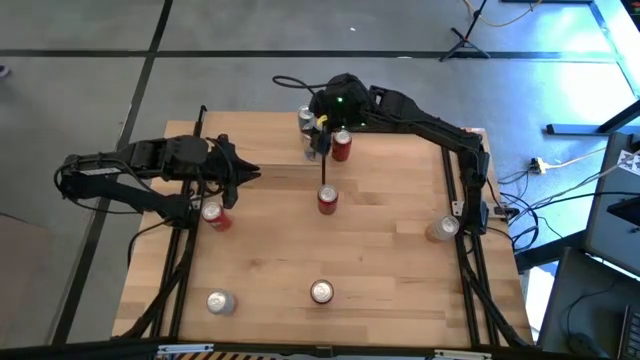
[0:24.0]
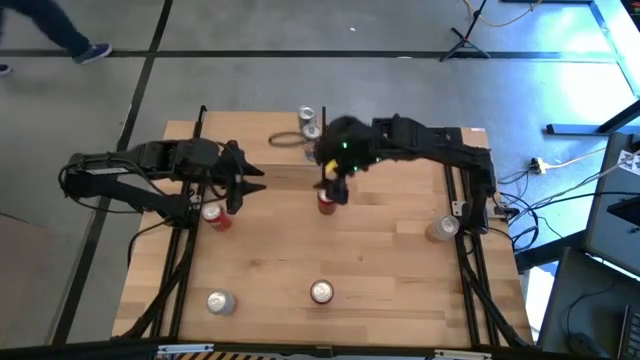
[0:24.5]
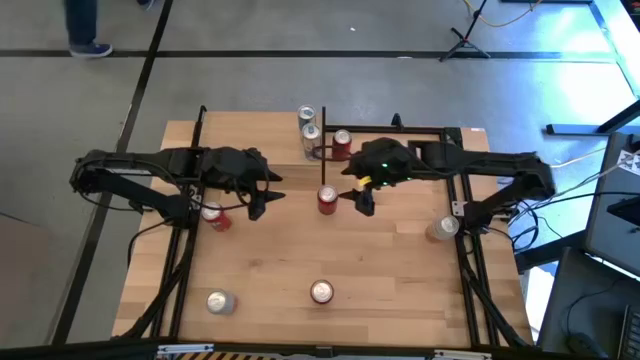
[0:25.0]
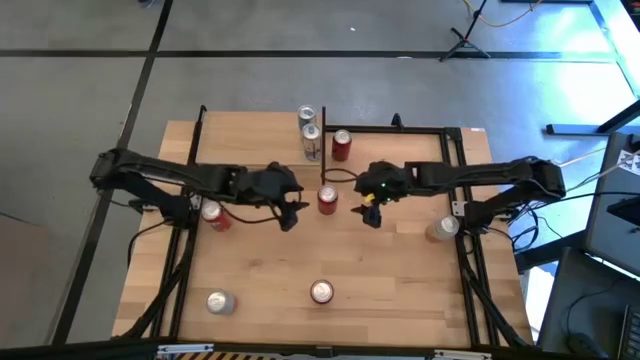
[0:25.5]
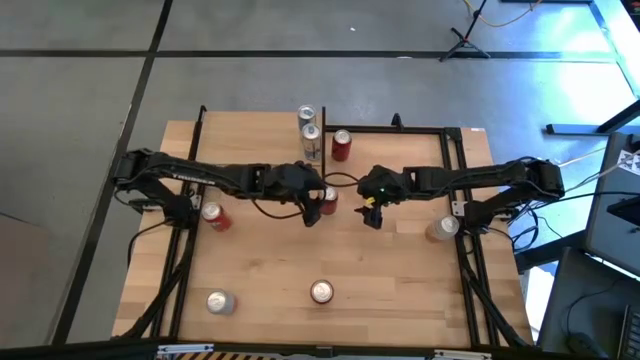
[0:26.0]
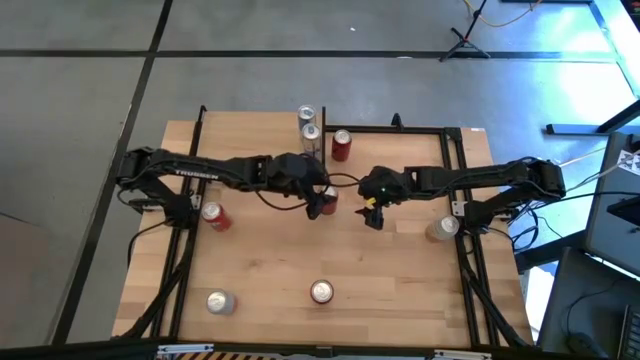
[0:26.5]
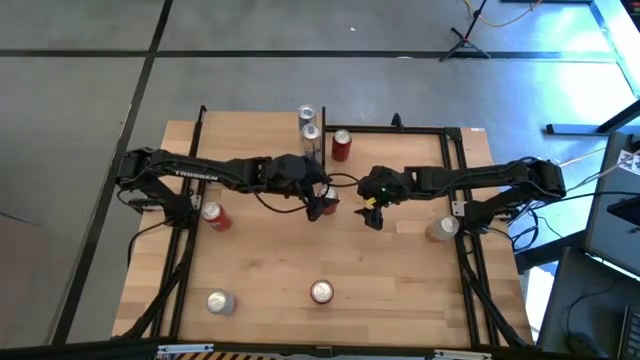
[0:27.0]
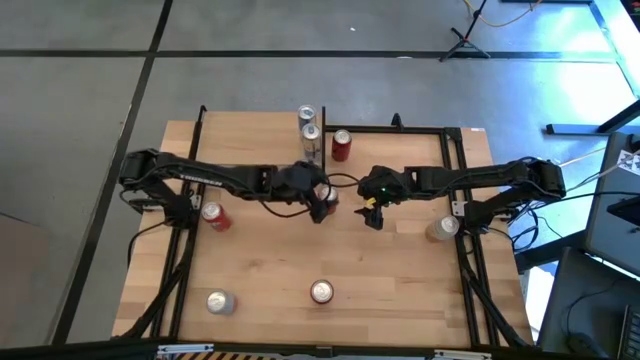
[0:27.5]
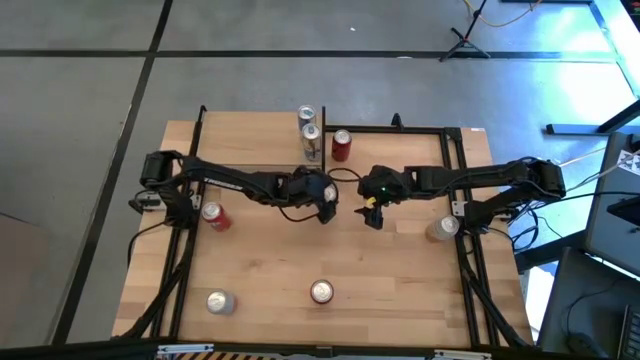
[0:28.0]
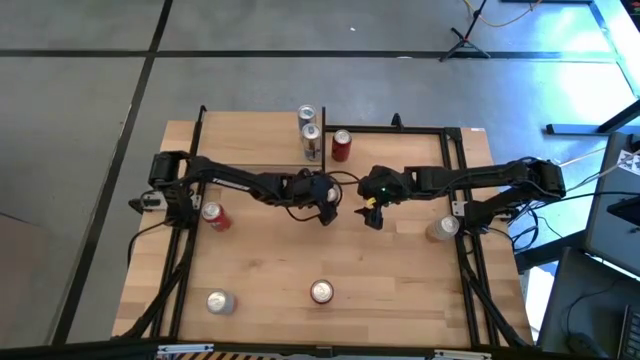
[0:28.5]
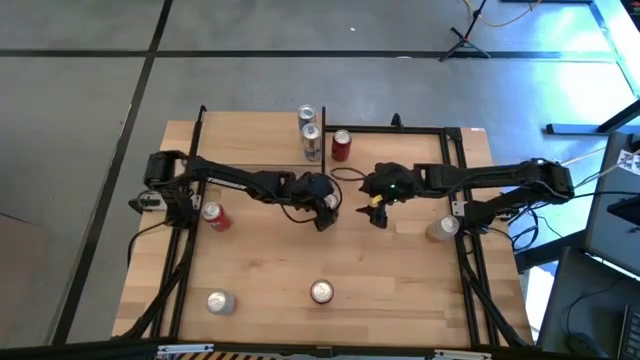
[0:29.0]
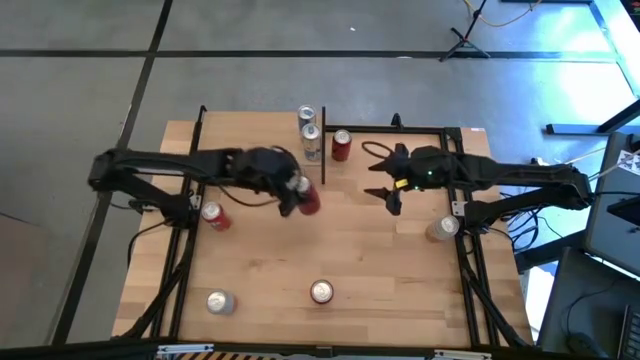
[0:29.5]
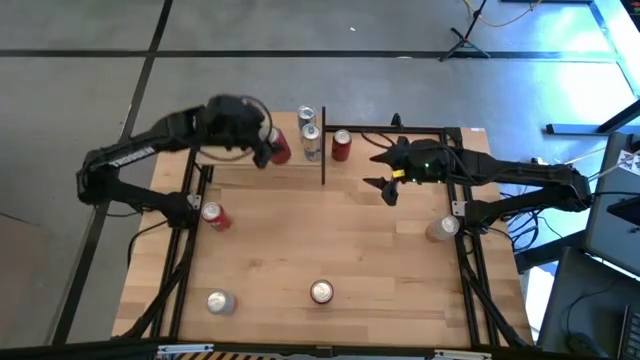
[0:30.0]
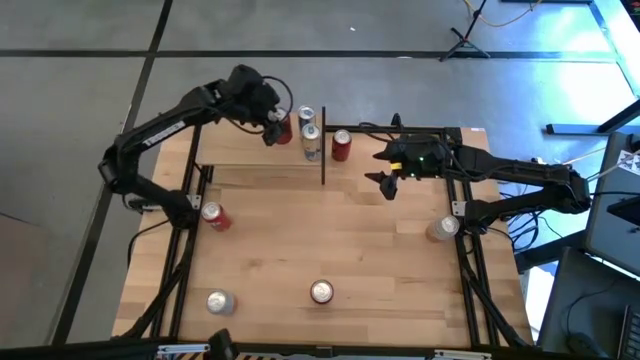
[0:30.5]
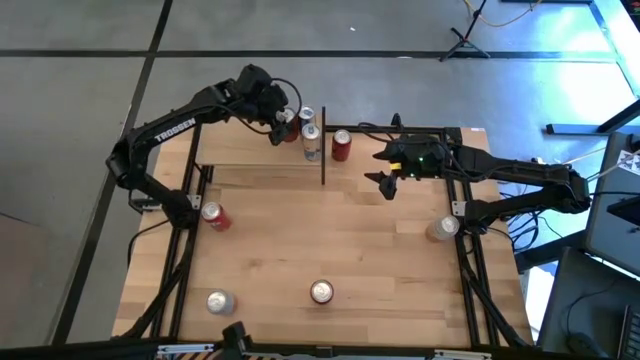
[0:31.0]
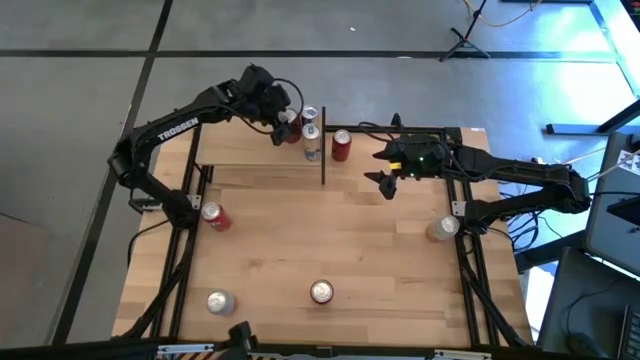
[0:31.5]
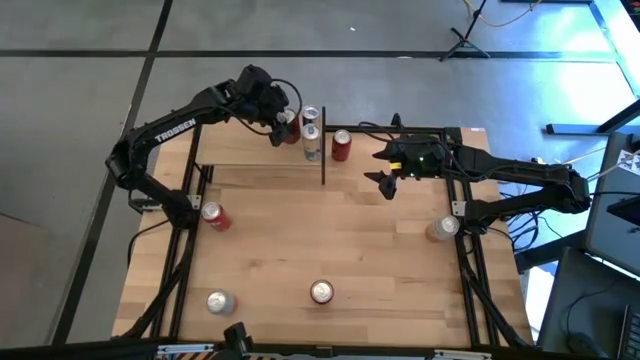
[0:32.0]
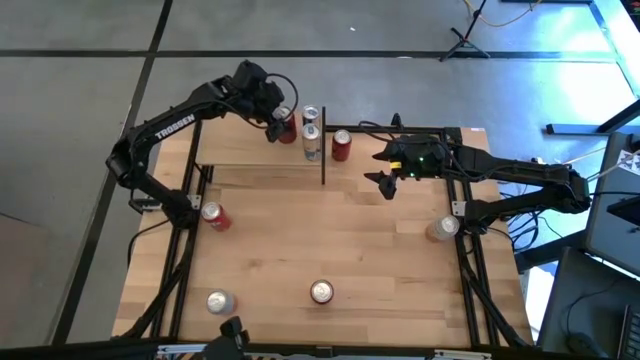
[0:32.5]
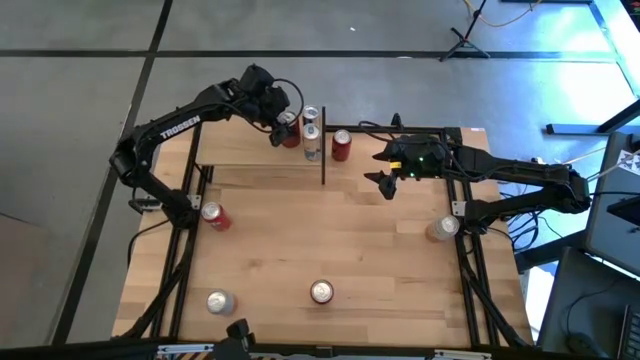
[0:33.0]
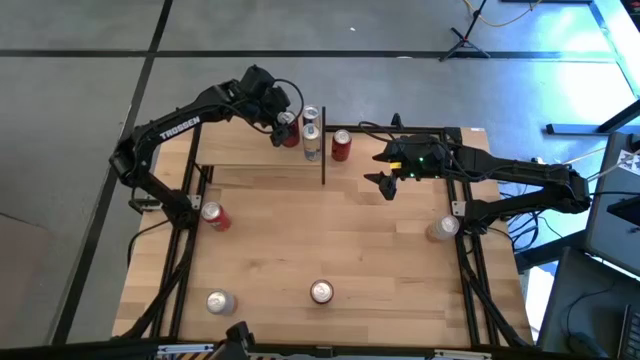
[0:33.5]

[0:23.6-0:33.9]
Task: Place canned beverage on shelf
Put the bottom red/black soda can on the shelf

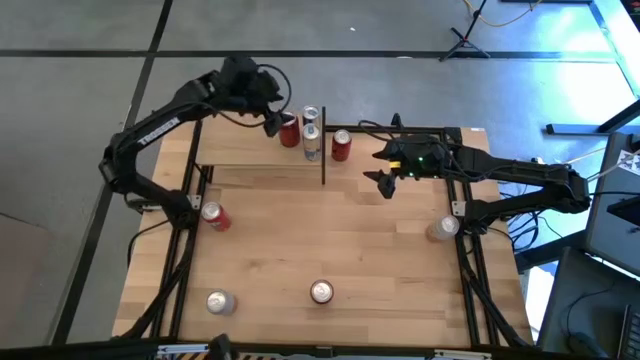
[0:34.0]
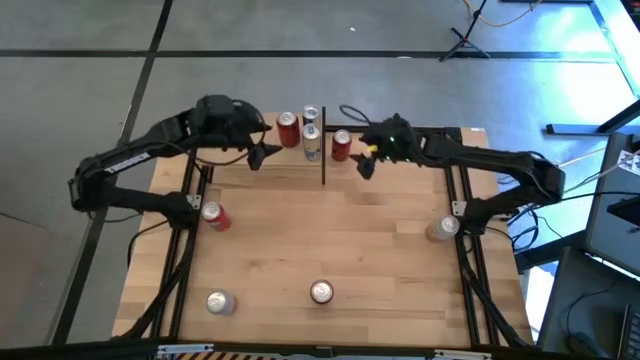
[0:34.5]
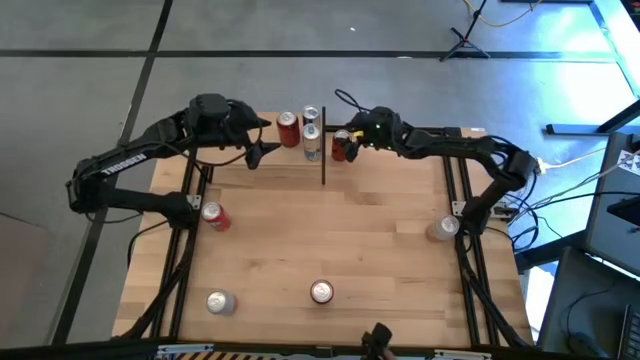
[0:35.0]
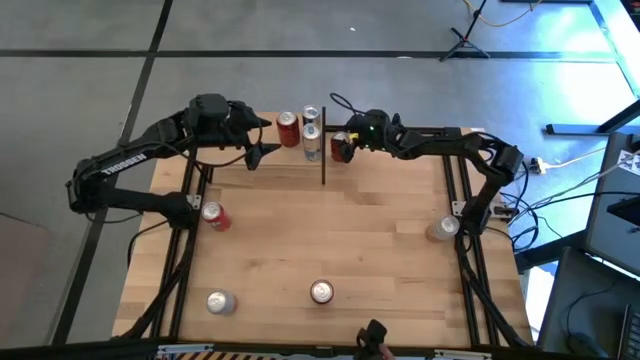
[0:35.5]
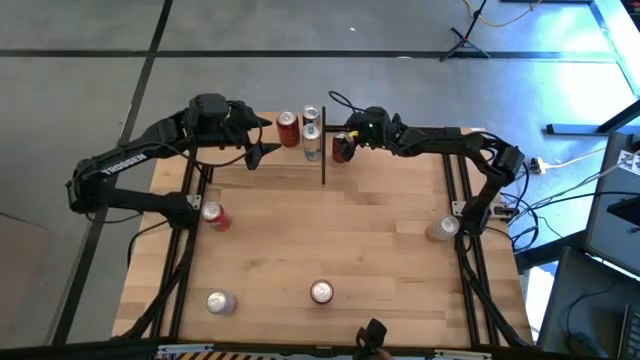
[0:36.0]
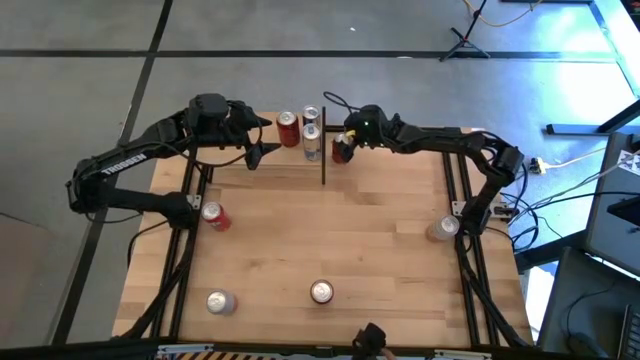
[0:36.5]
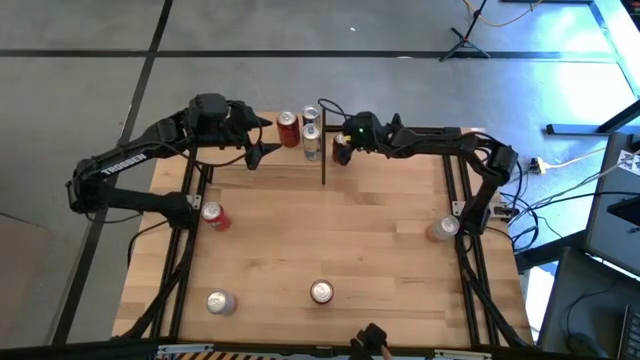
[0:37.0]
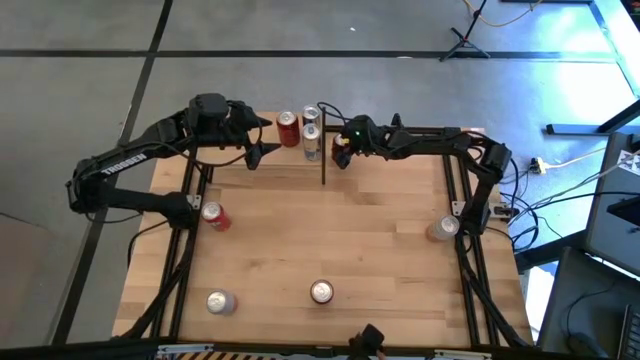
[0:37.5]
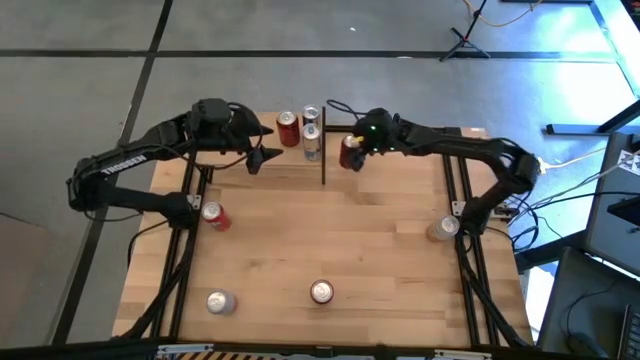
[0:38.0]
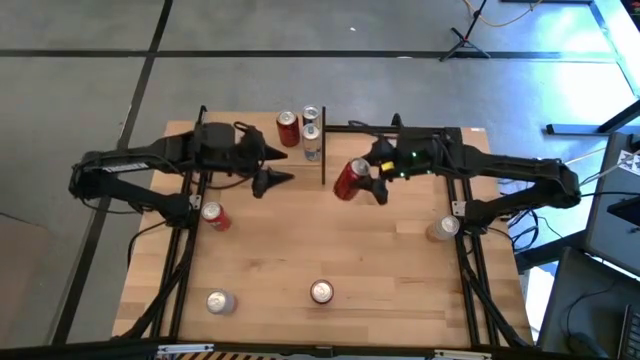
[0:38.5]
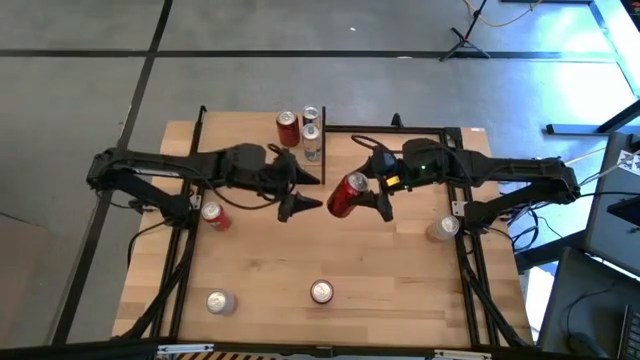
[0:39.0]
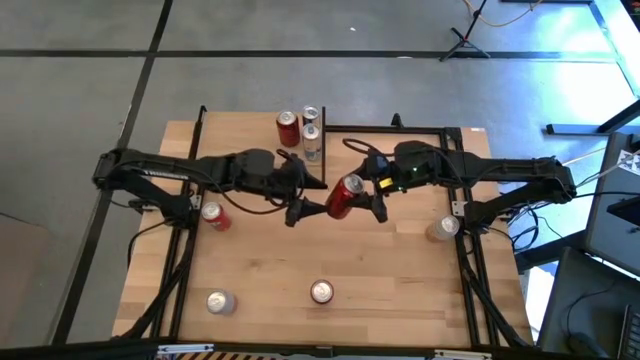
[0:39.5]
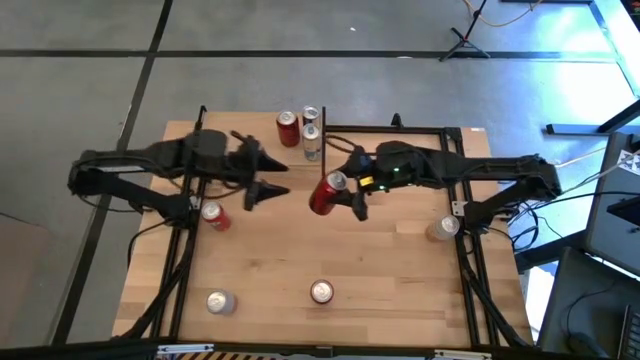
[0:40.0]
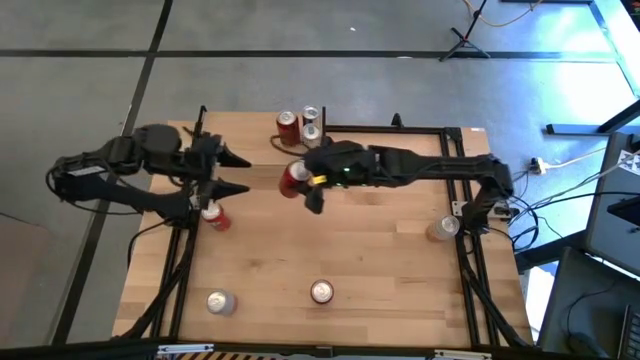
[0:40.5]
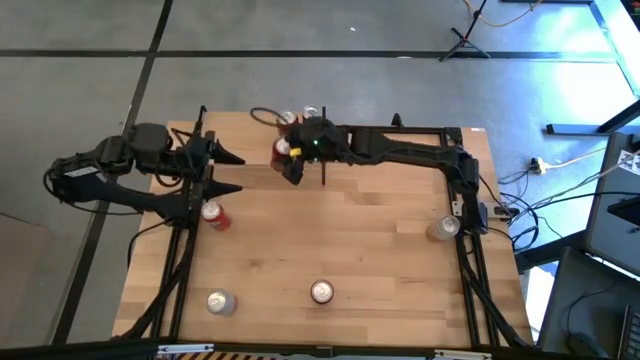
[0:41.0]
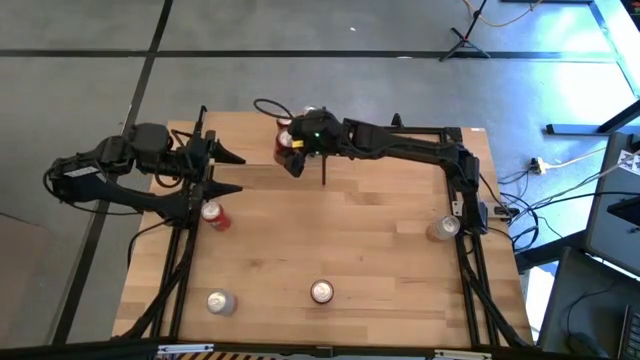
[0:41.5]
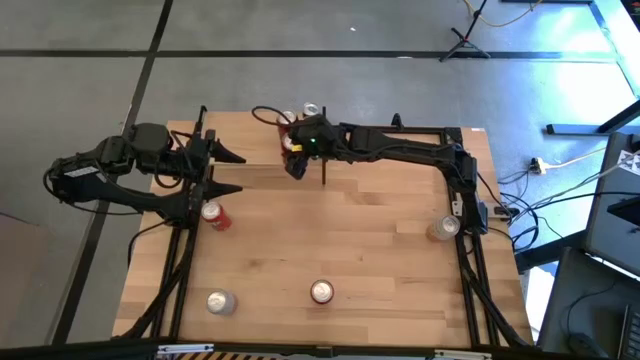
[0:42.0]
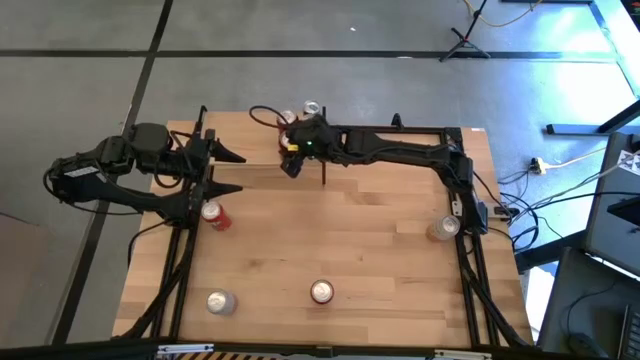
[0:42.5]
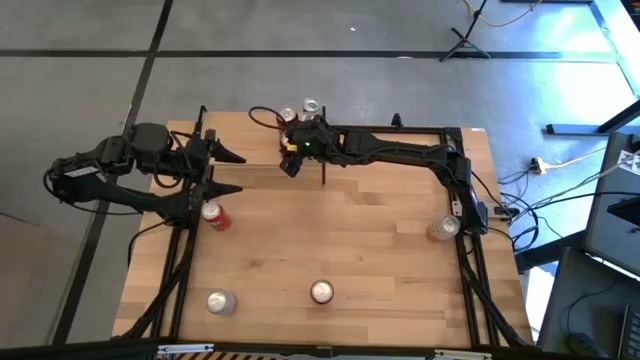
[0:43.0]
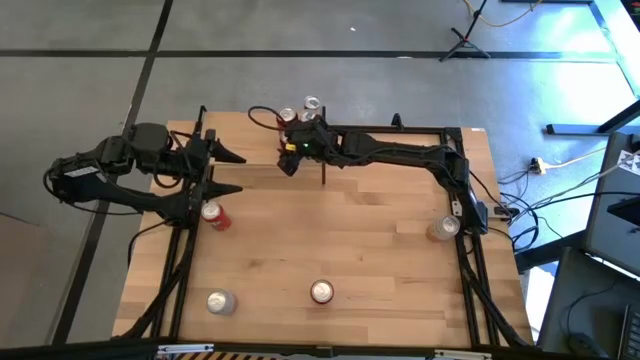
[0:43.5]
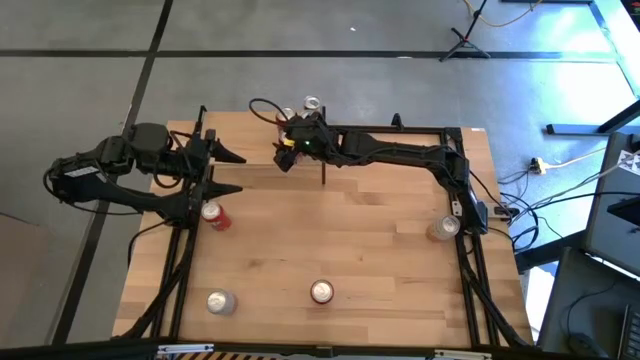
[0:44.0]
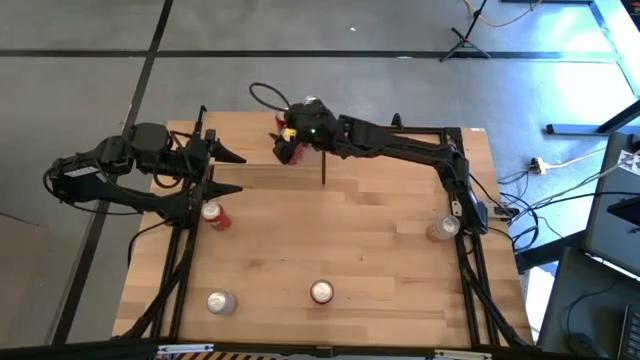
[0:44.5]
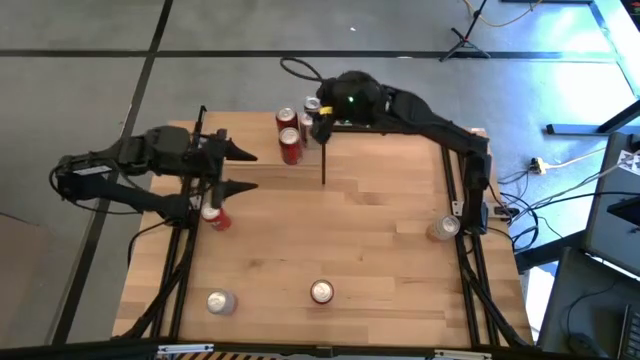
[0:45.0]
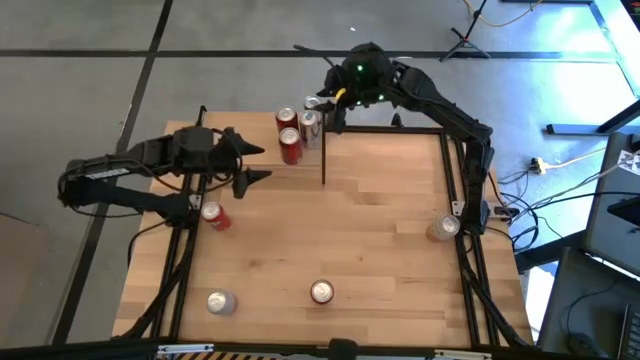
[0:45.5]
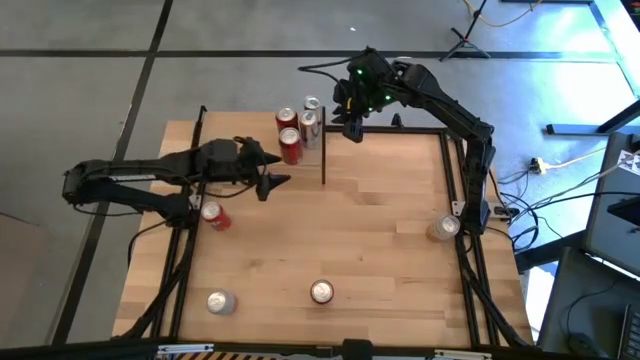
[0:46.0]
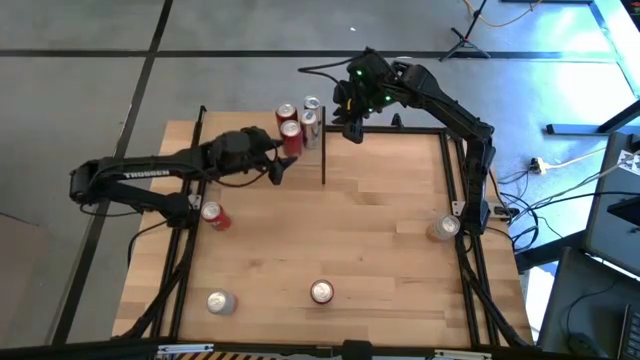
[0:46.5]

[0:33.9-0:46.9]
Put the red/black soda can on the shelf aligned with the other red/black soda can
